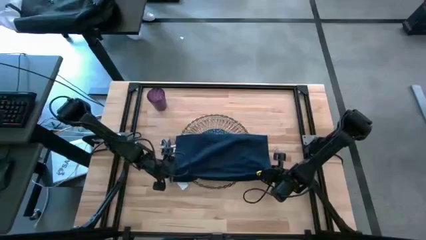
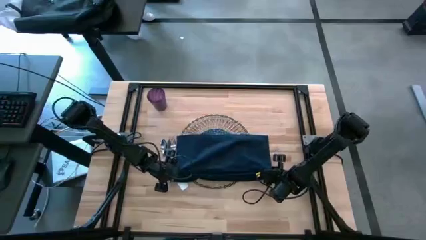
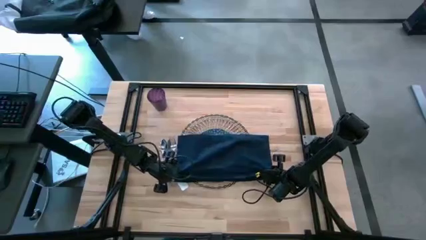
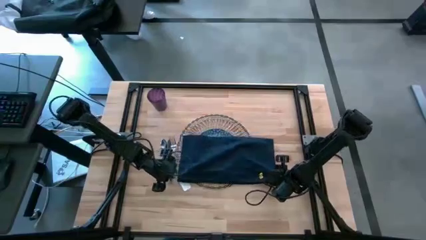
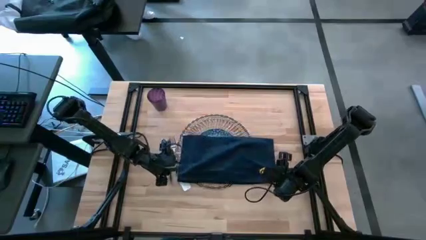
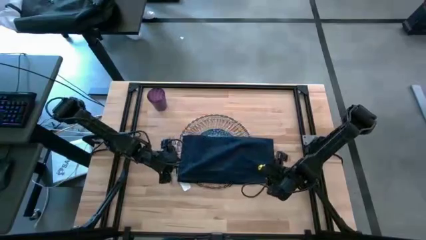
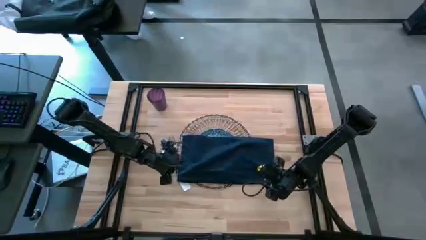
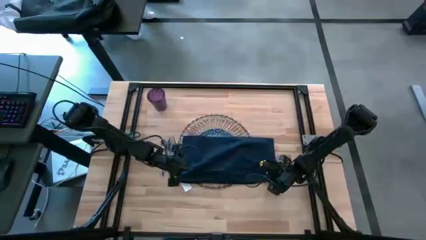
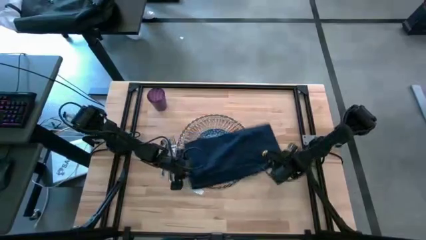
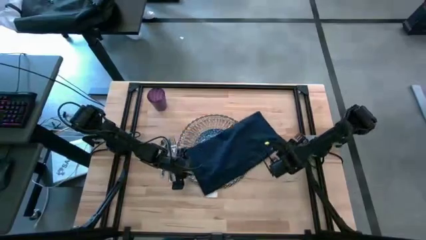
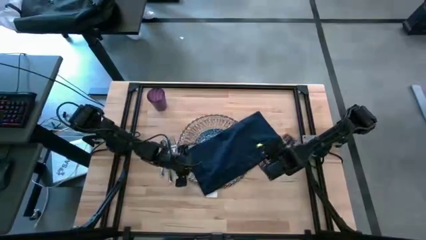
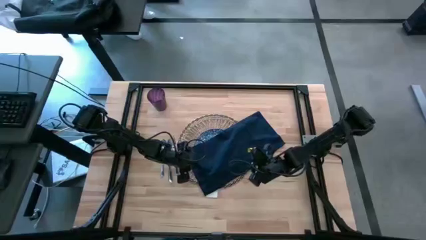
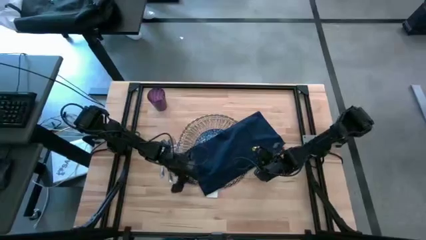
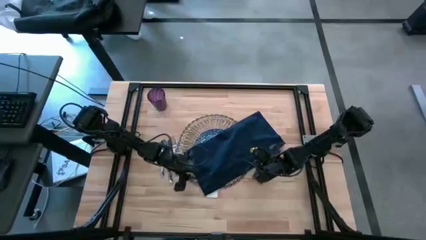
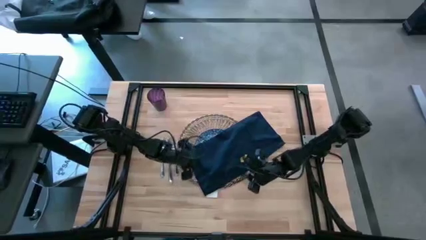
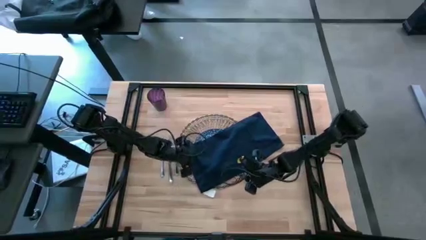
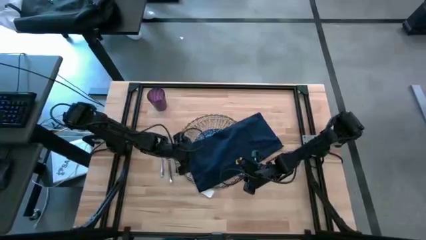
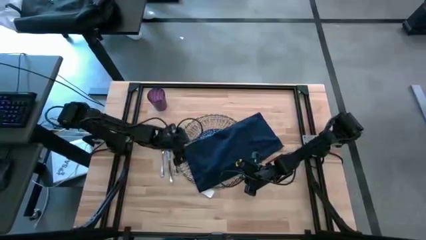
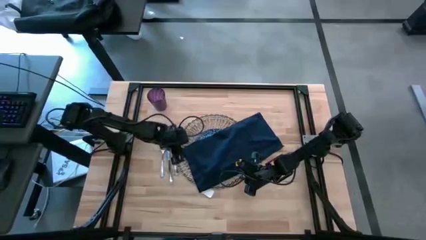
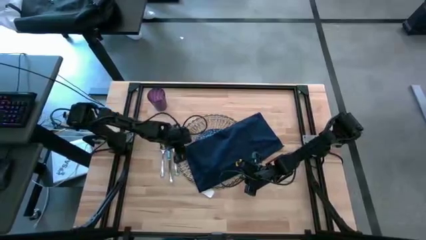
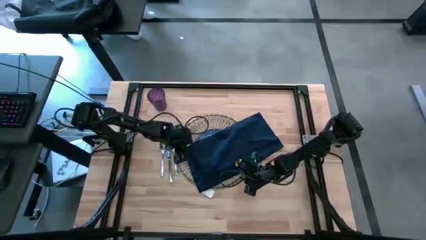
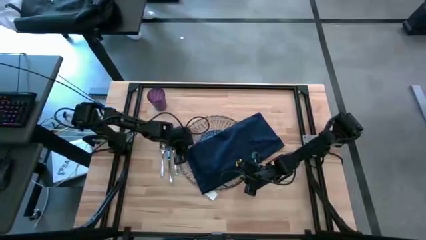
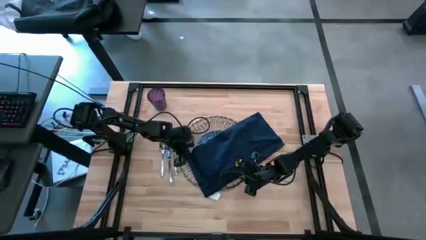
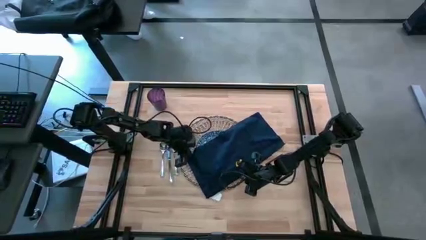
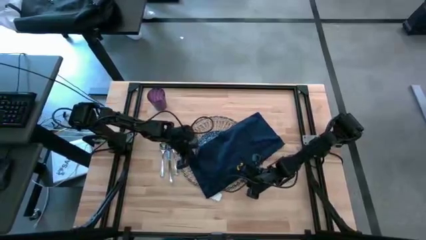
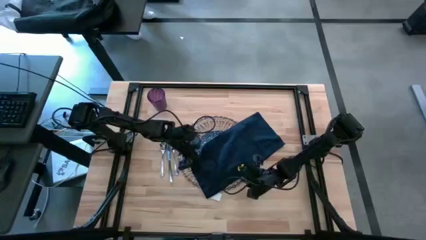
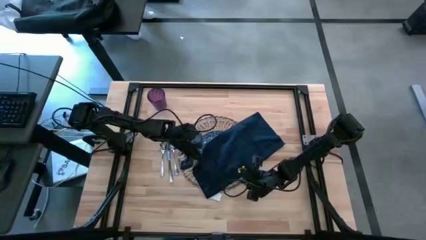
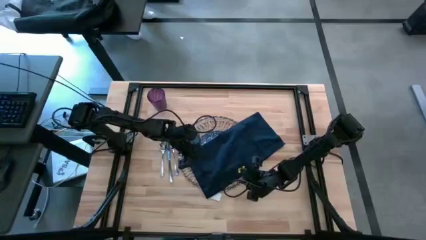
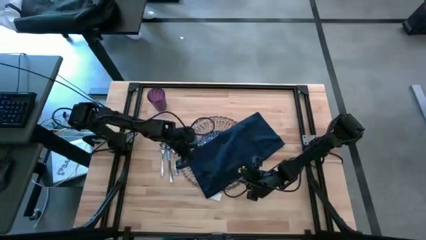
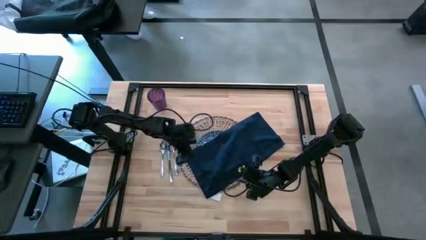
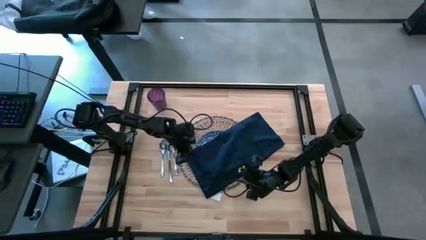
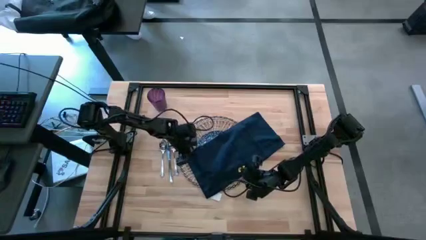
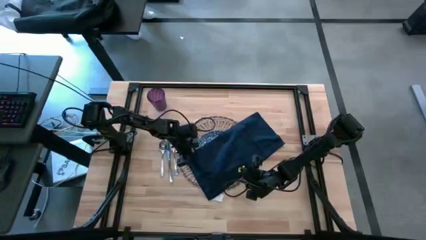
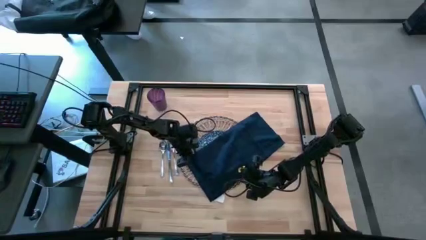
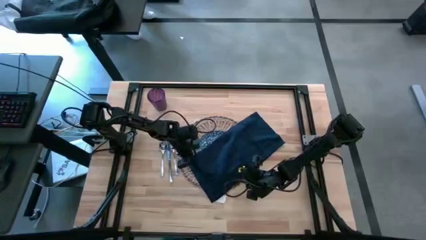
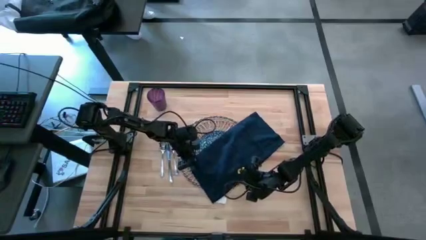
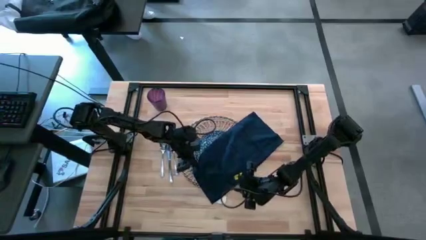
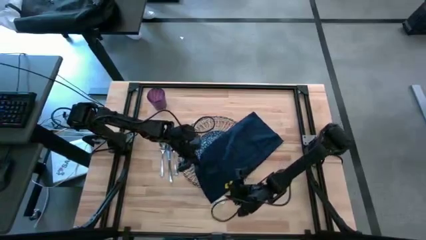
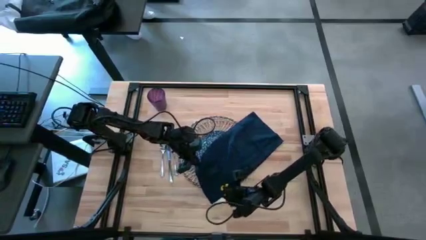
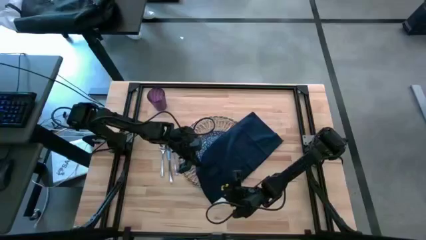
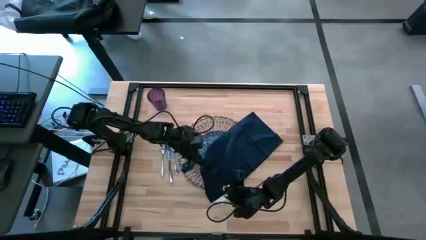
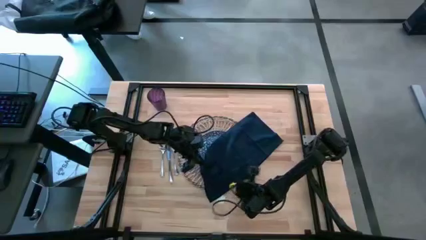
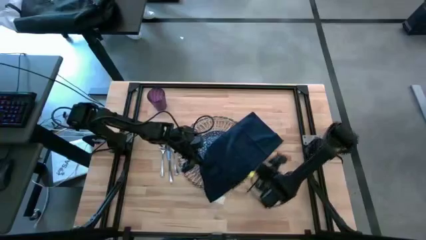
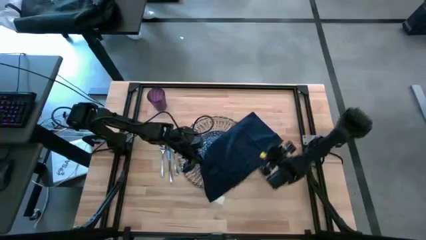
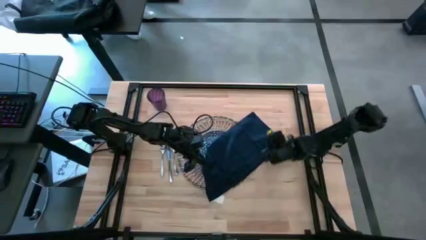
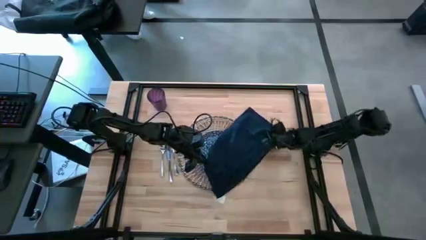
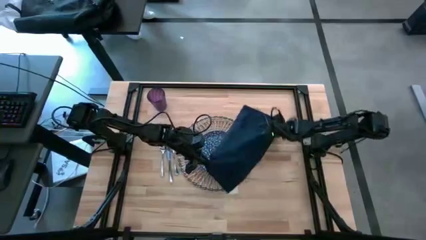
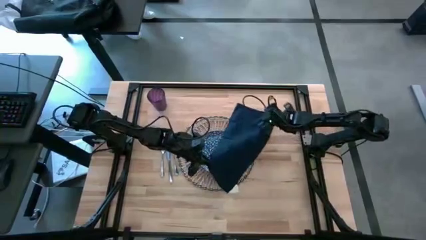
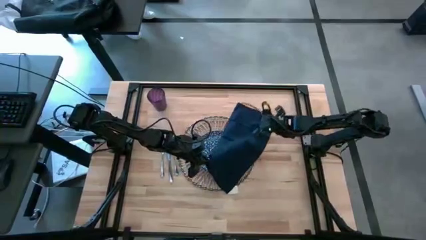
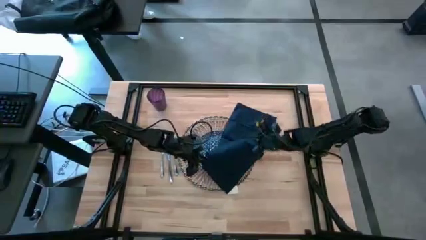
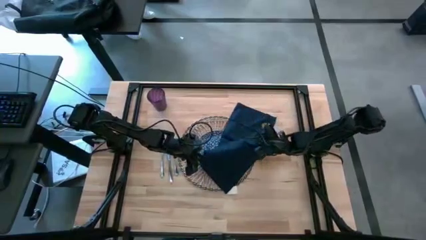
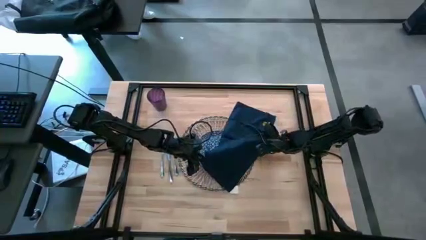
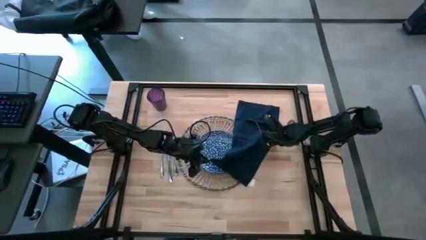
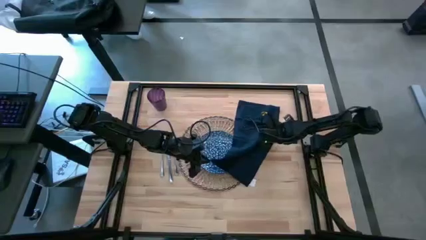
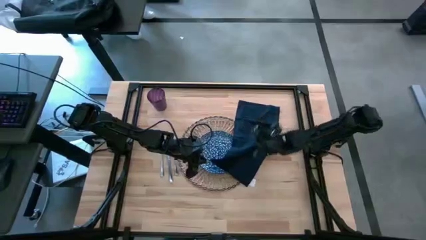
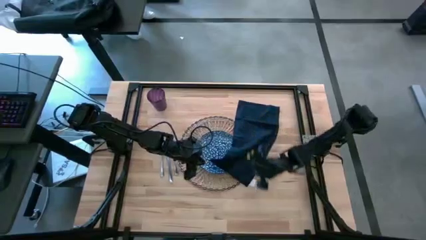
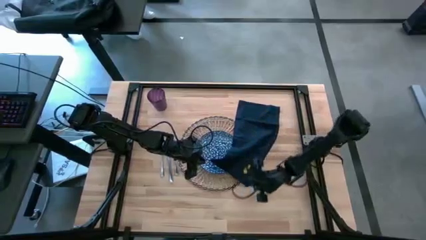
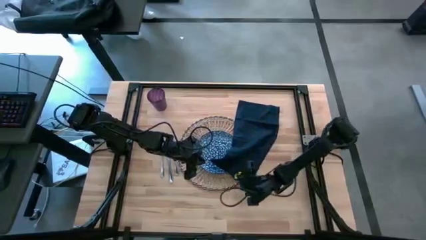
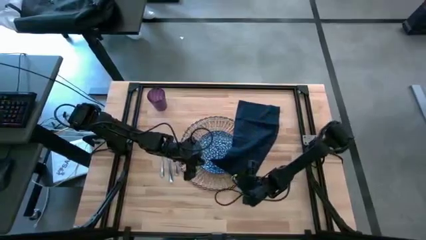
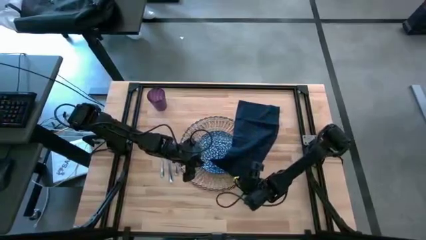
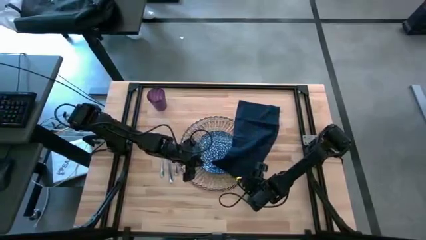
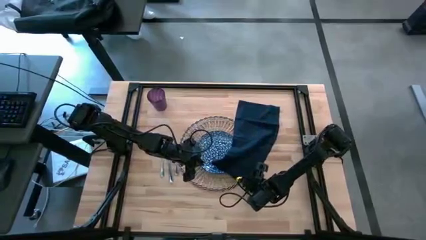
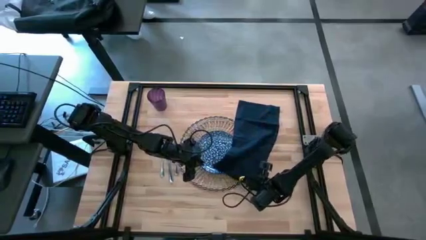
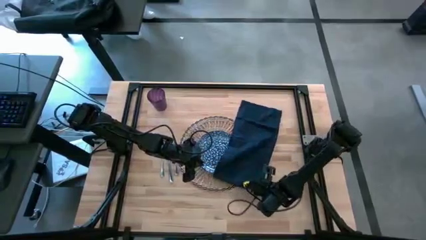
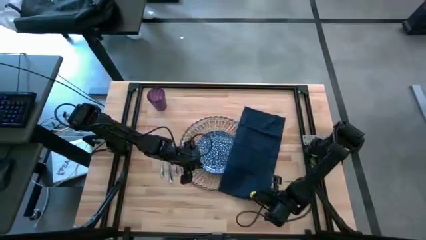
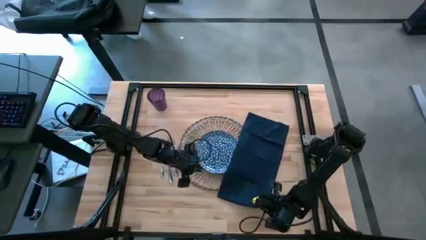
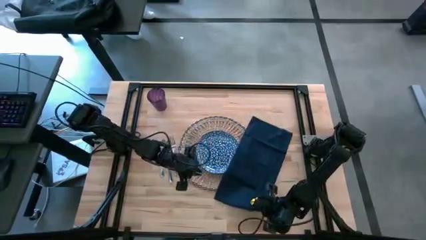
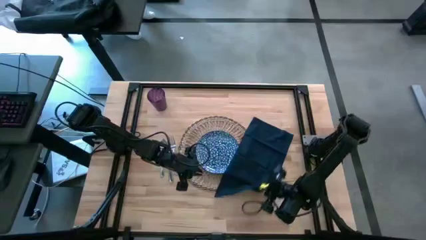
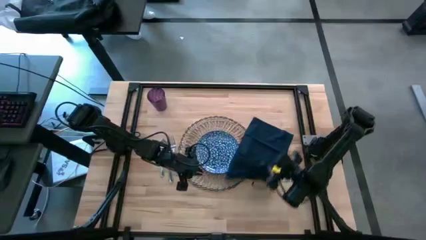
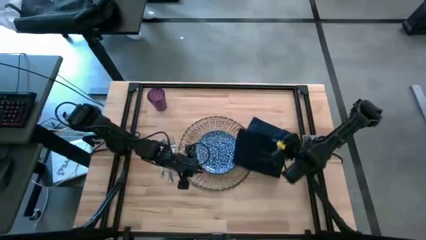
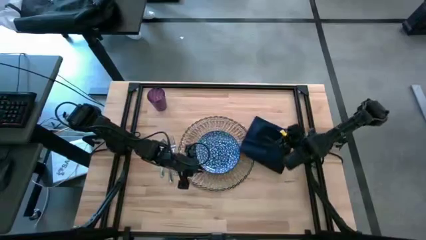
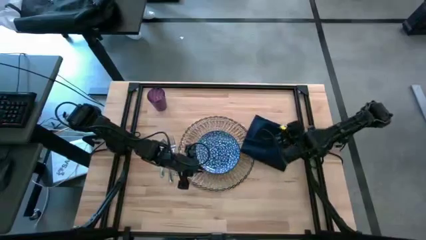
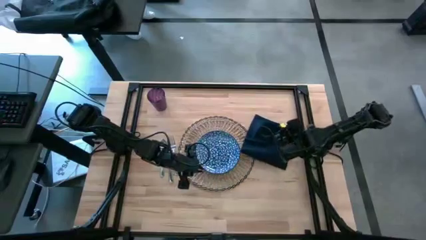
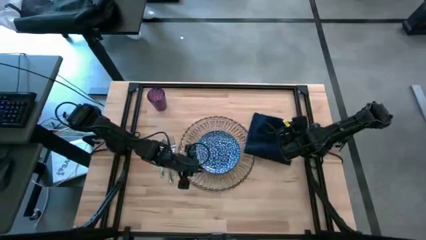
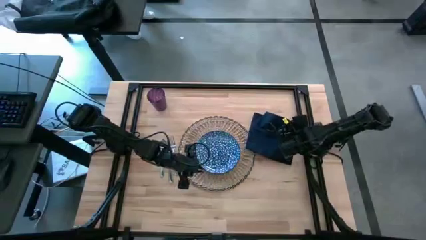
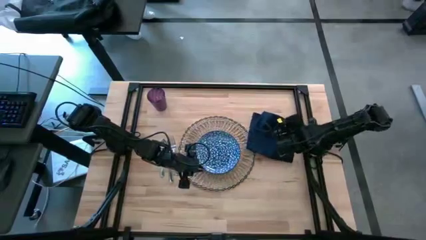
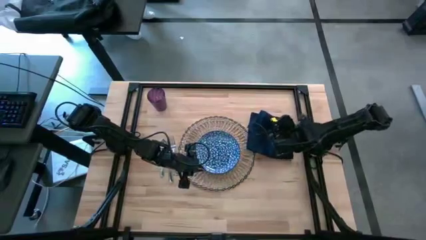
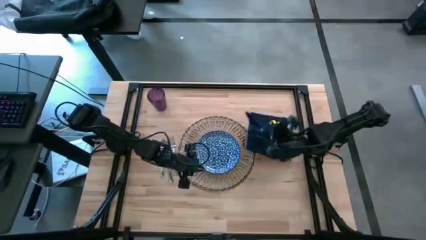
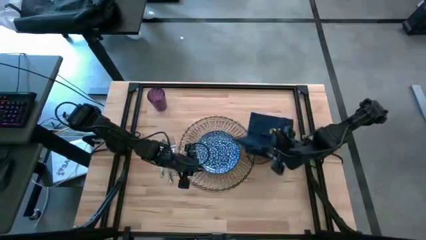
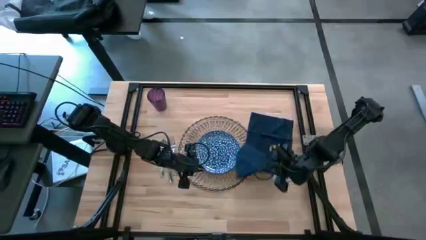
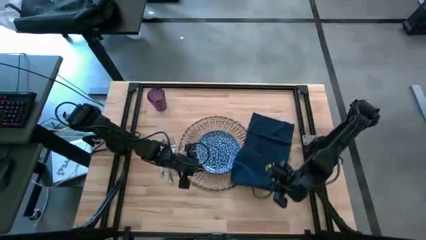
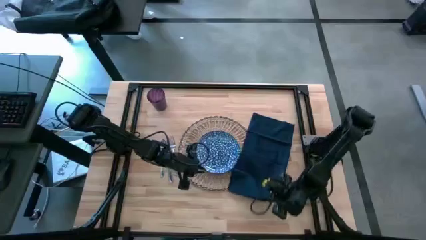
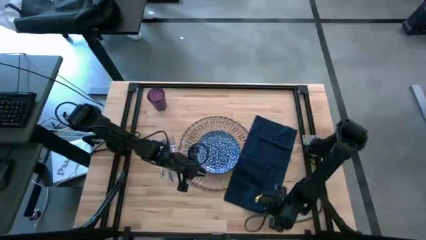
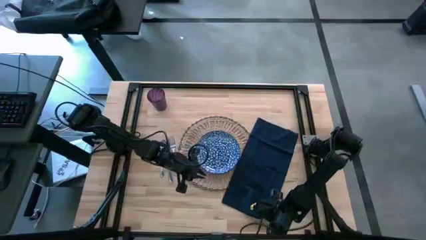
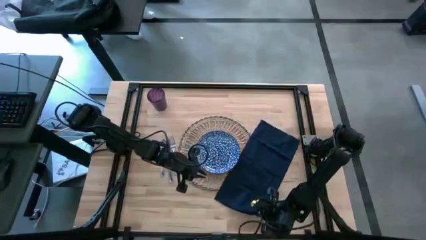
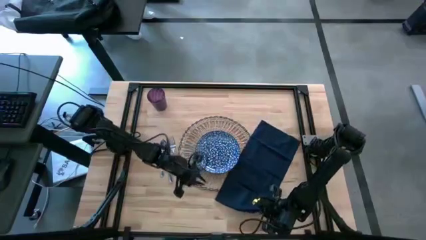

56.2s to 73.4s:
Task: Set table place
Fold the blue napkin
